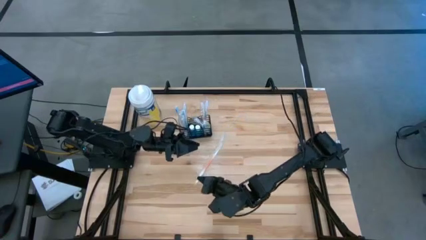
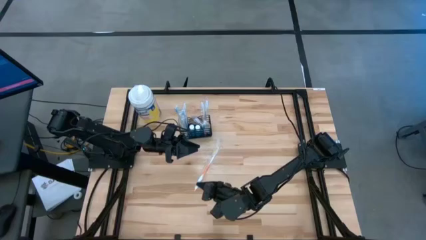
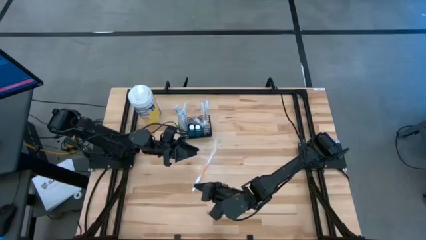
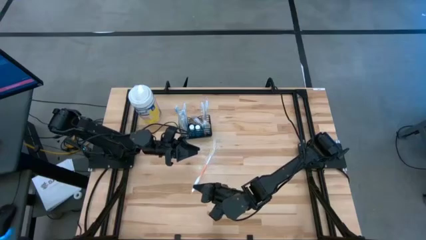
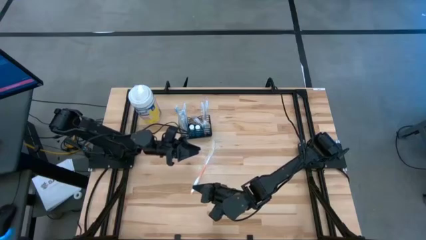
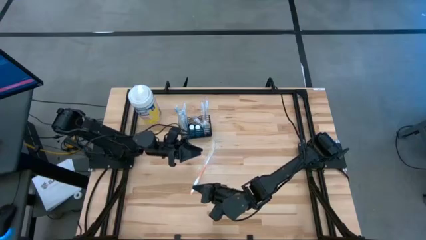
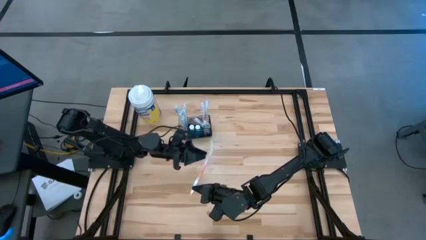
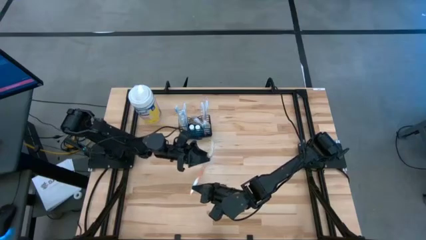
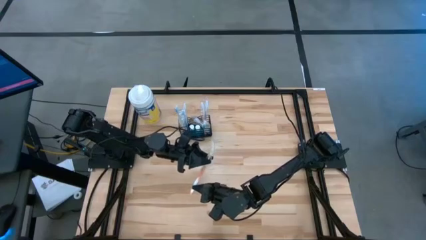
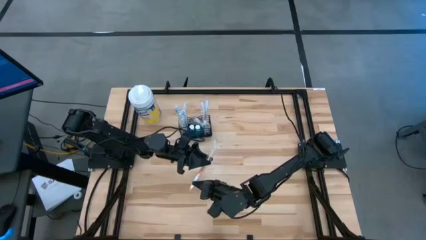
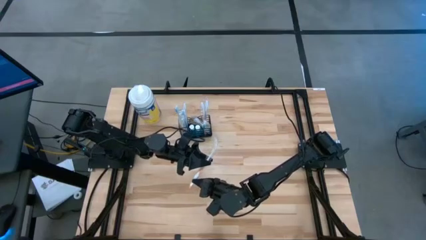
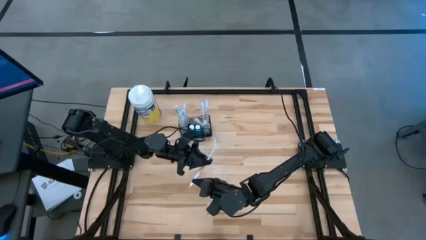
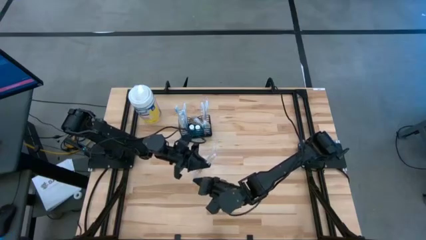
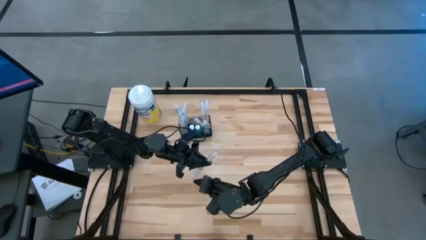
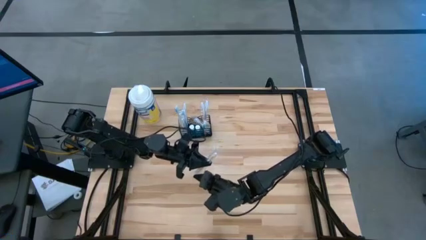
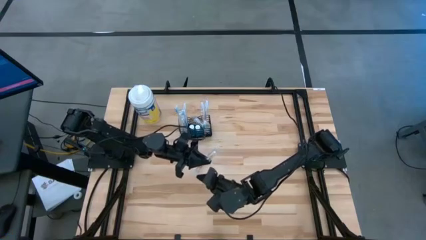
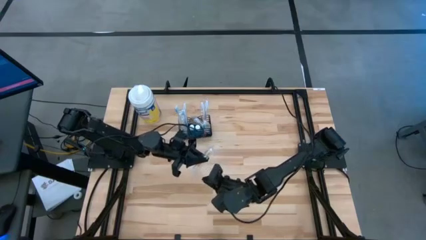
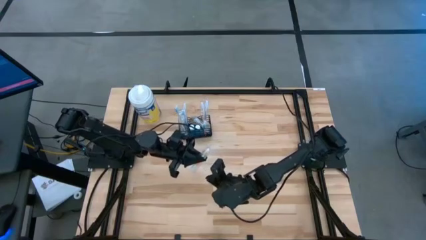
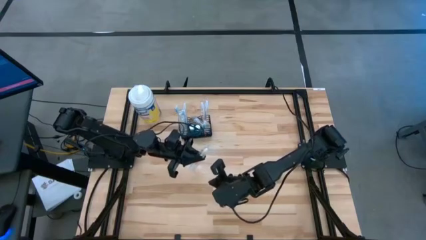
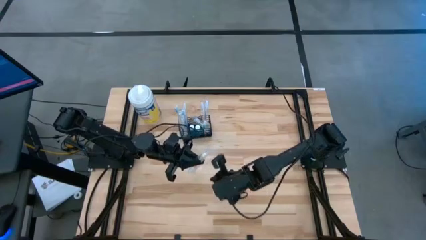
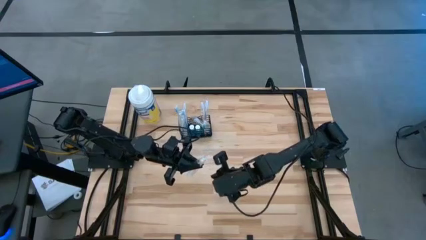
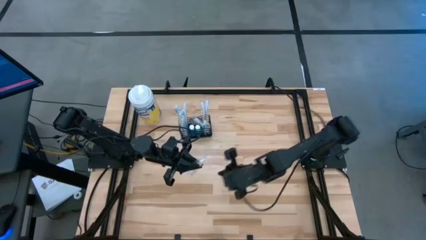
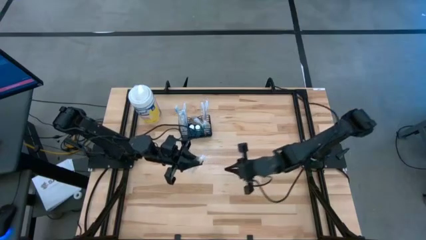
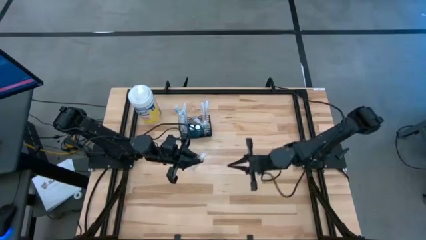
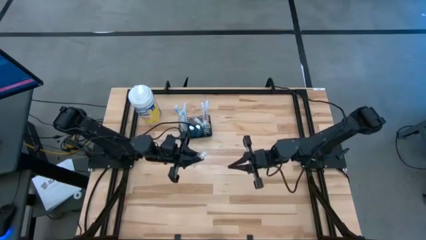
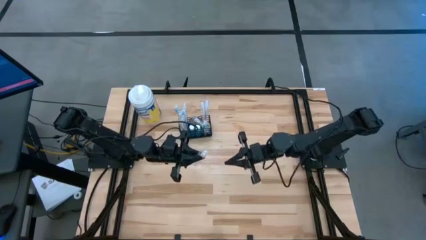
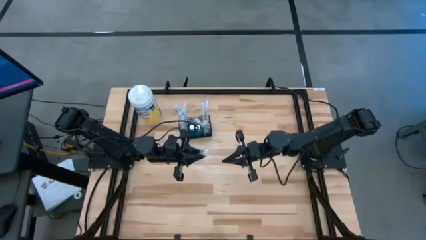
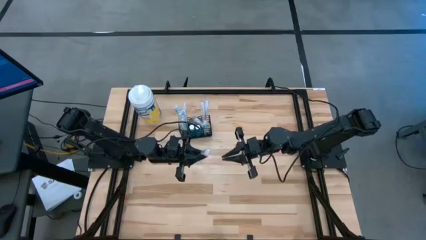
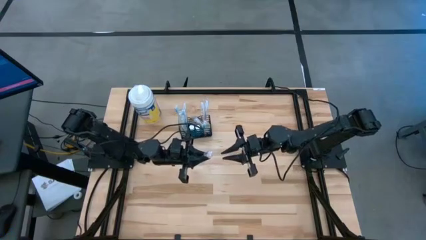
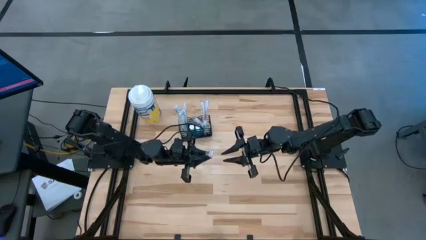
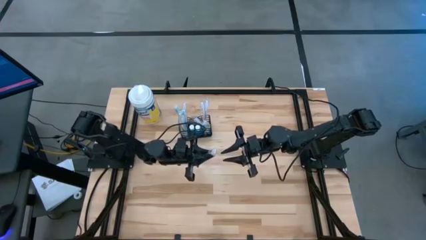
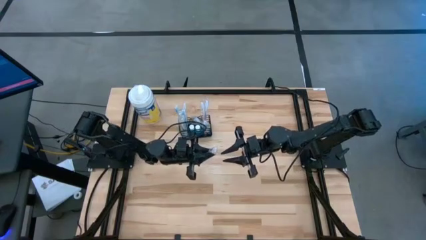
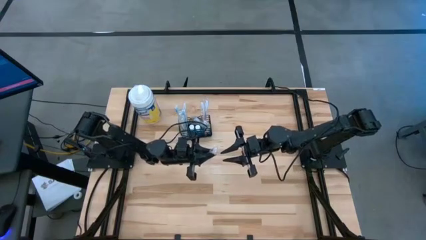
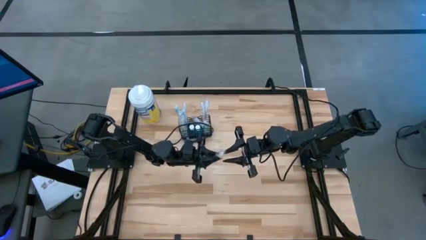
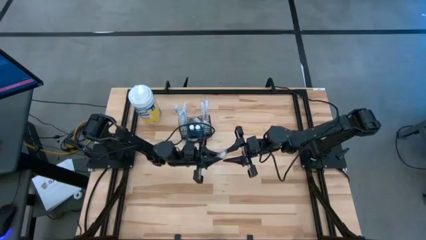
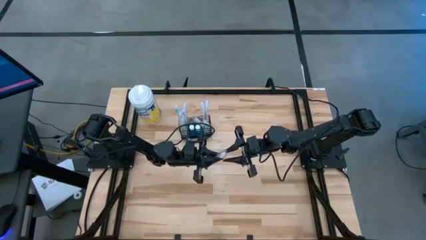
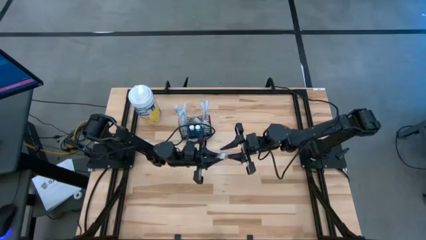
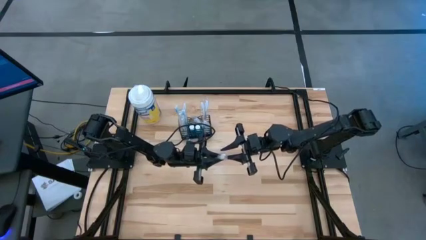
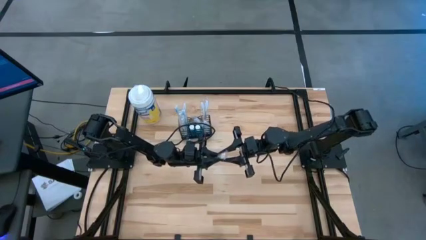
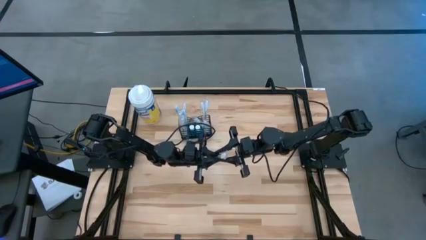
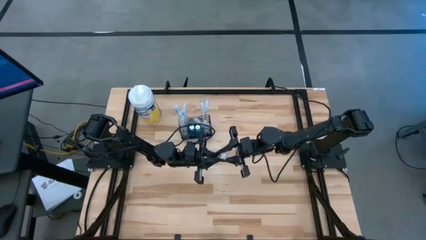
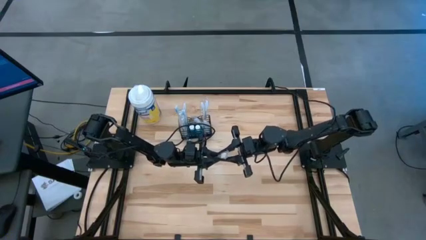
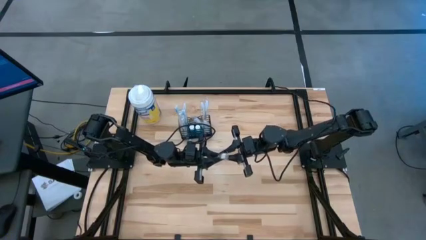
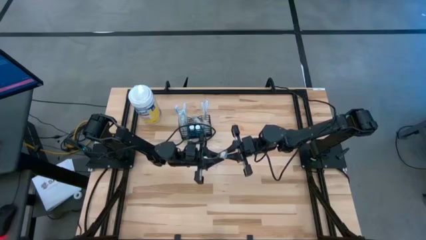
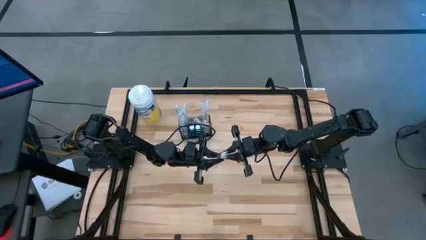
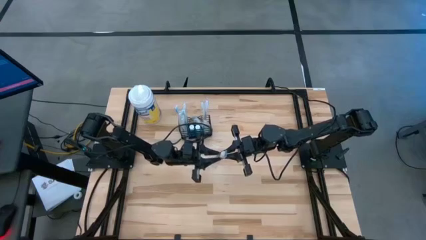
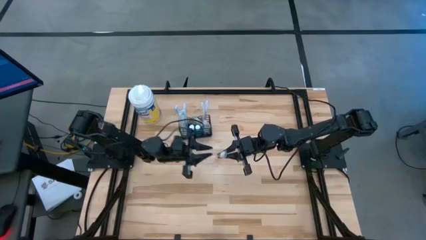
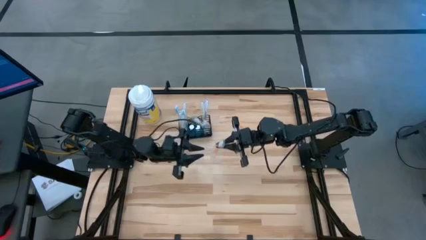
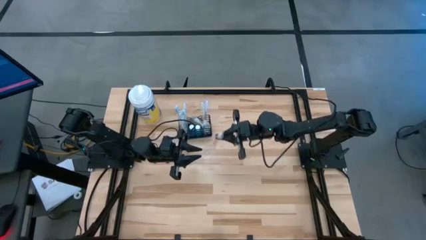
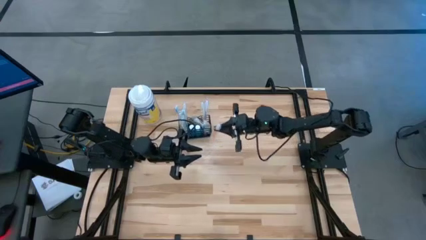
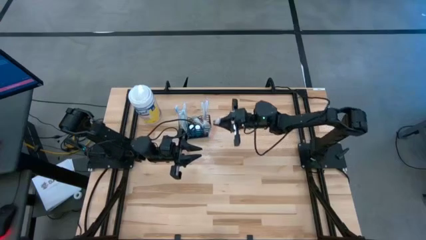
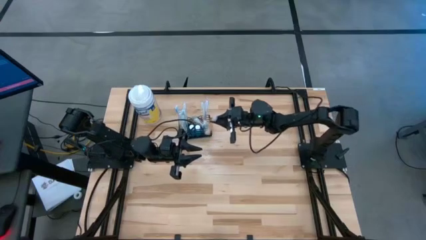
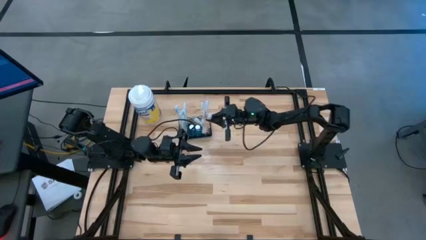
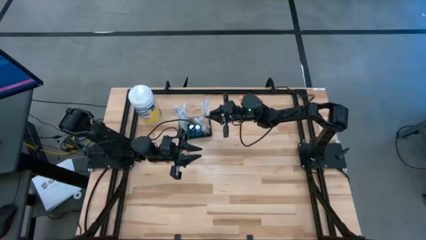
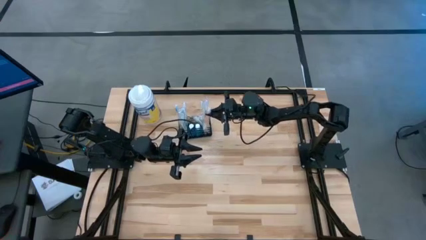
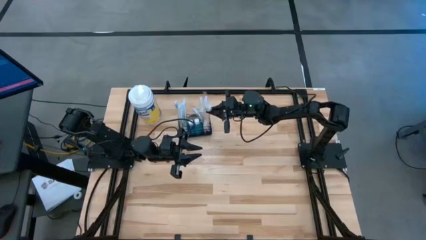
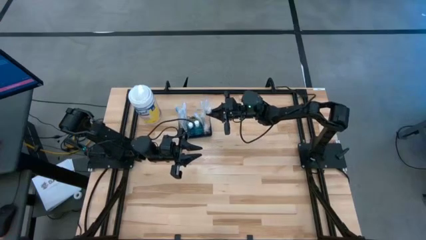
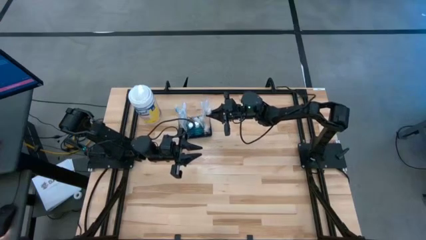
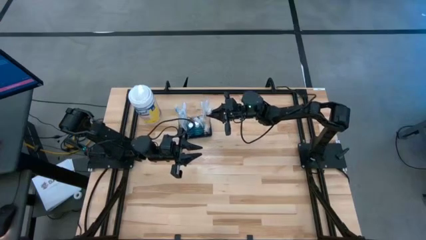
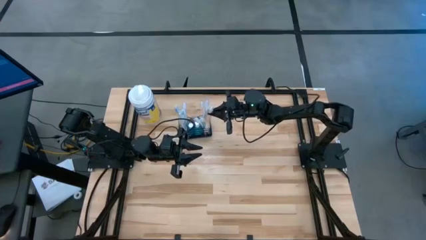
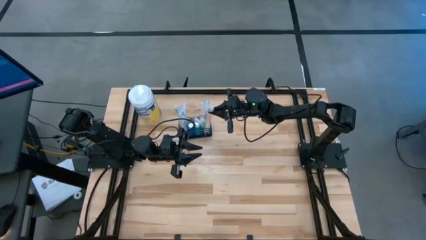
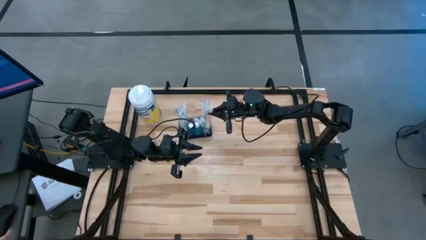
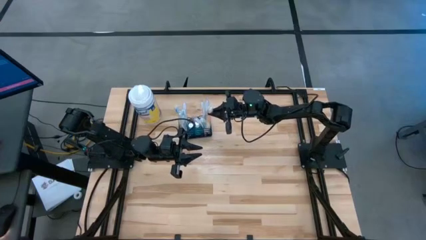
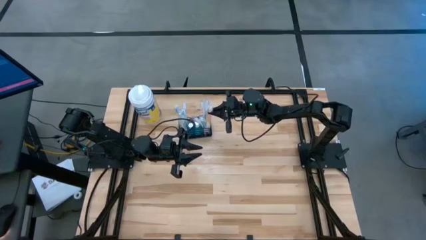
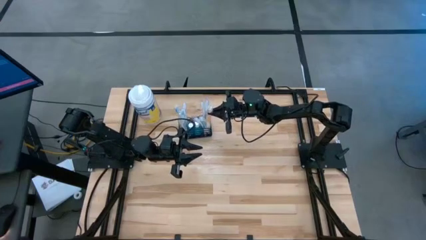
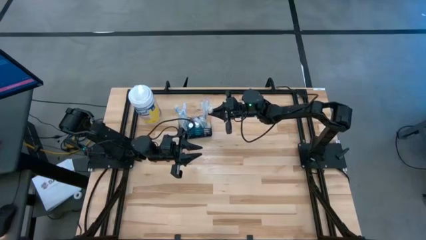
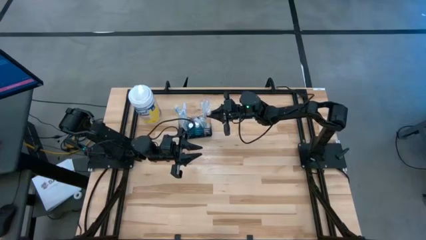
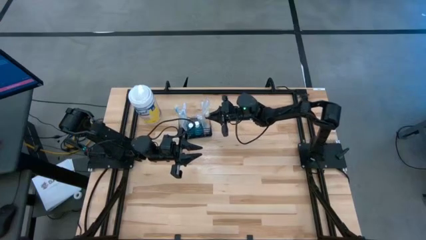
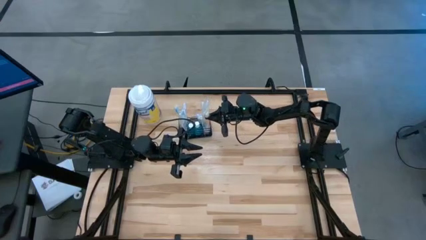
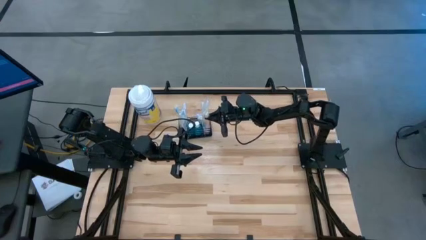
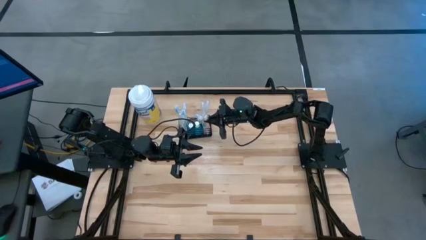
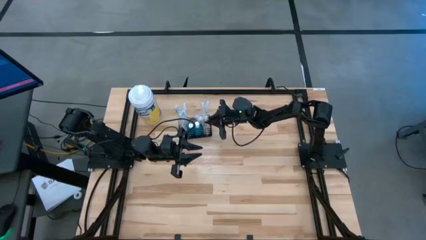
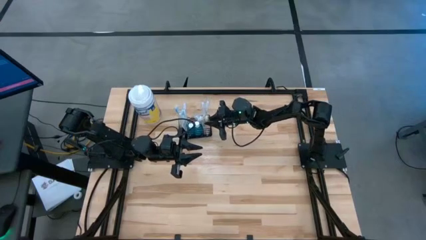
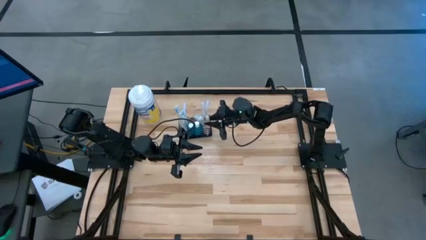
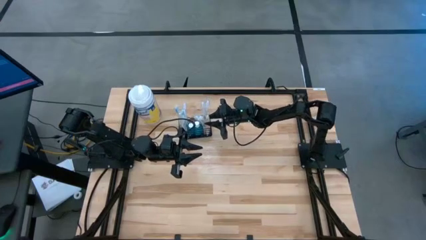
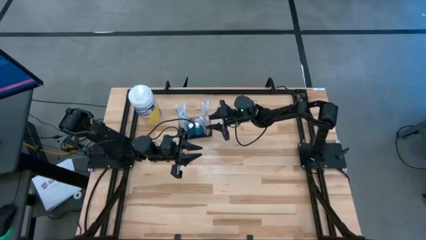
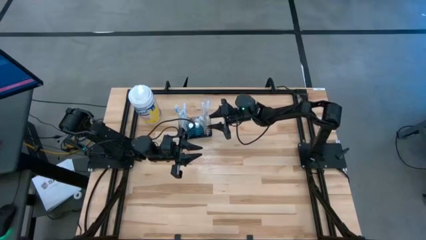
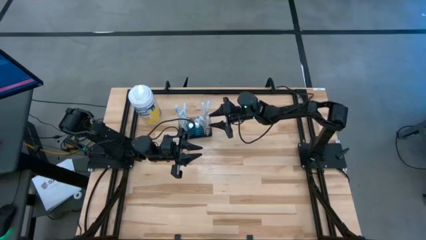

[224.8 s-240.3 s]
Task: Pick & Place toothbrushing station
Put the orange toothbrush into the mesh organizer
